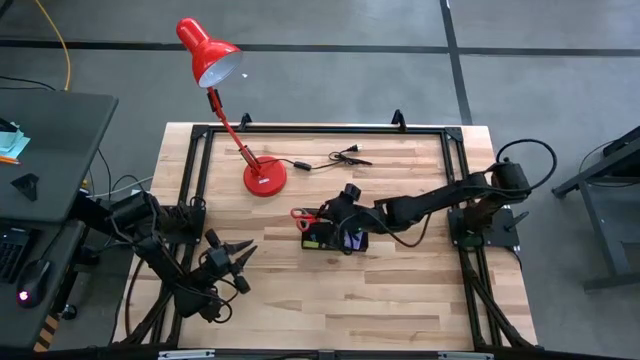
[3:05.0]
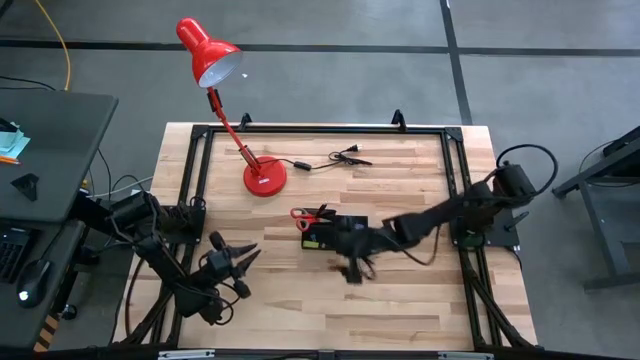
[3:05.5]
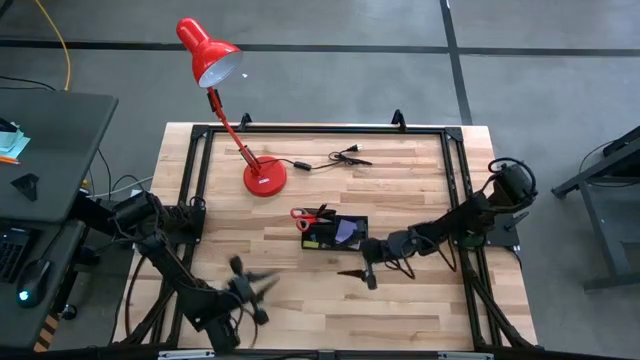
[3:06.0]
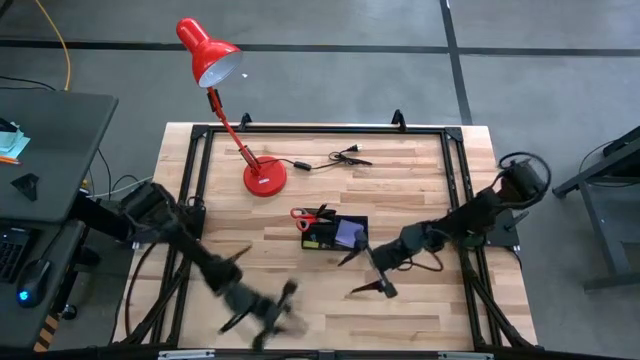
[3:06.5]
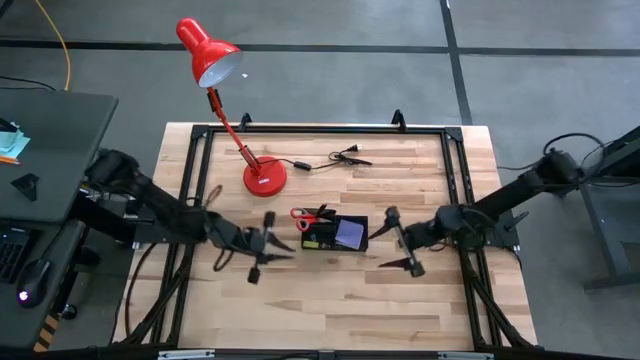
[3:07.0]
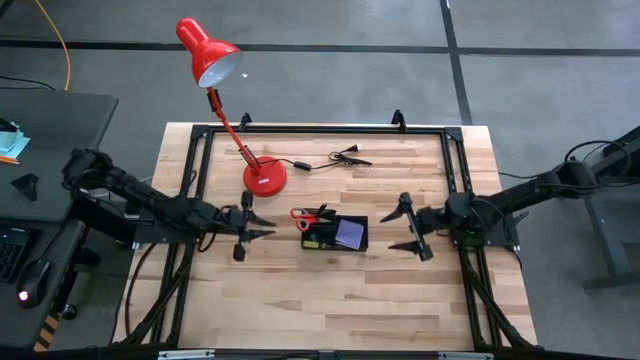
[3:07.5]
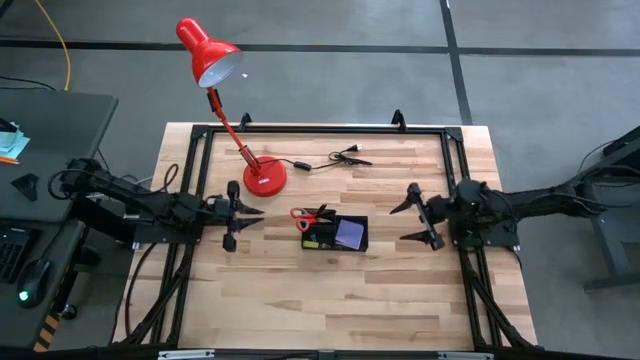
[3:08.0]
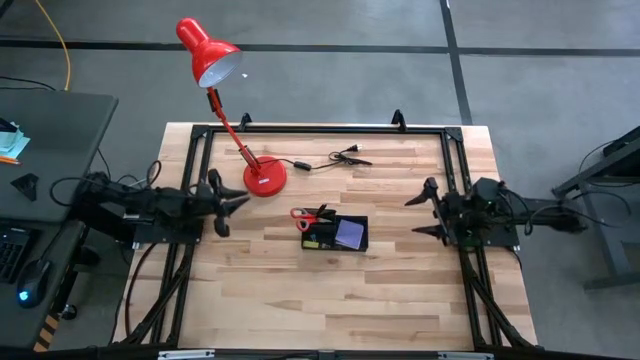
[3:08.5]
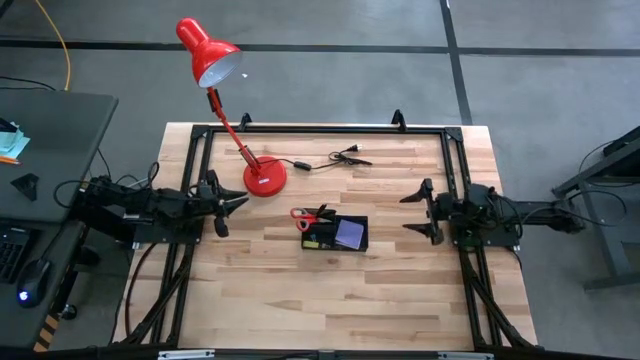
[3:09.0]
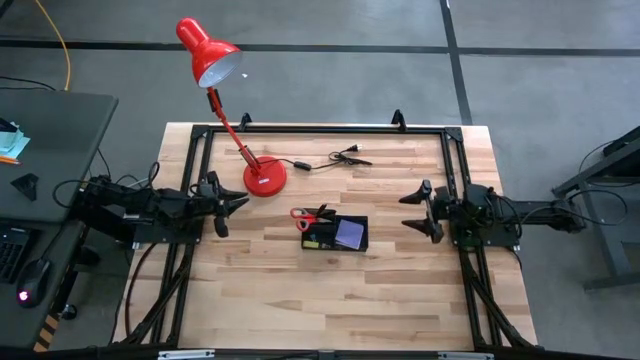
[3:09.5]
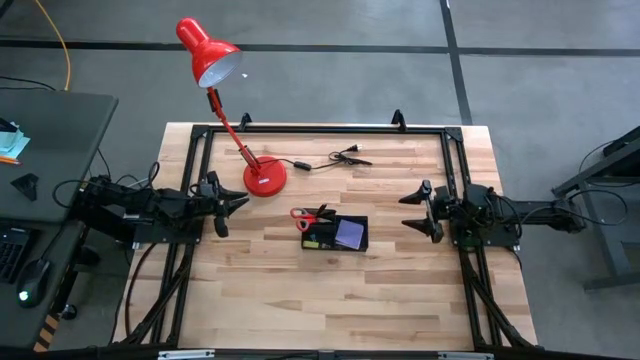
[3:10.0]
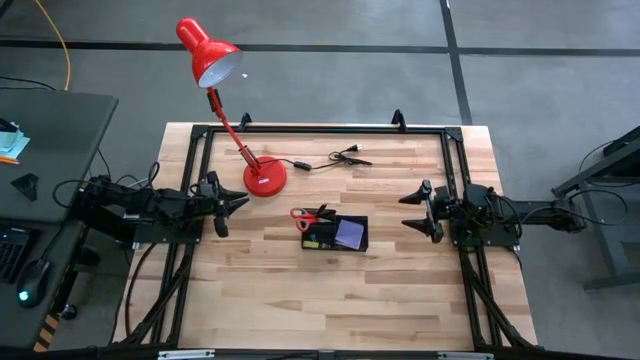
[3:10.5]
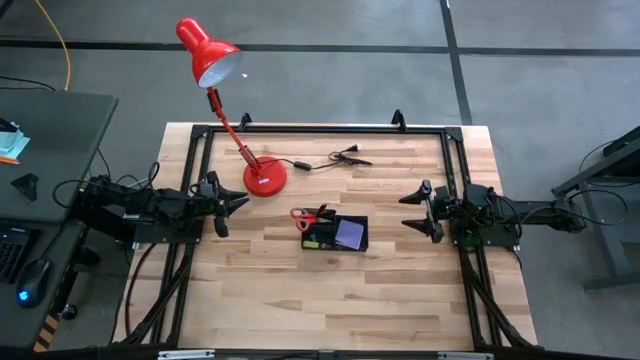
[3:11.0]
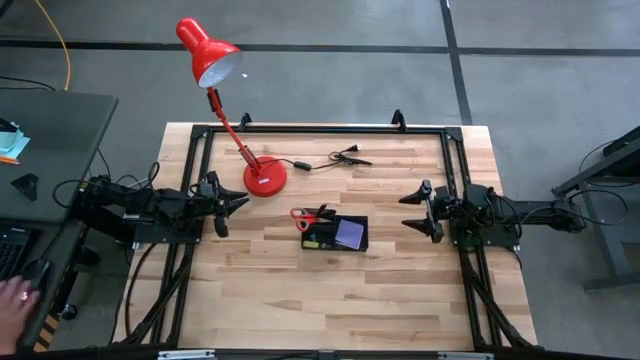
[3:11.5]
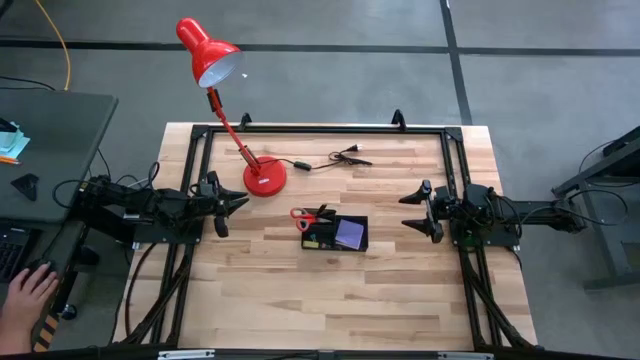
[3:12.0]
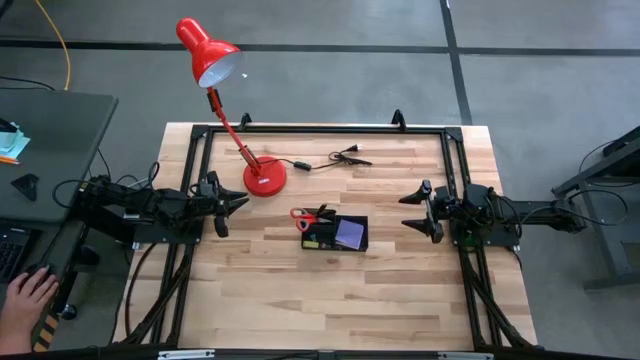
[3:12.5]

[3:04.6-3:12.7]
Task: Pick and place office supplies into organizer
Return to Home Position

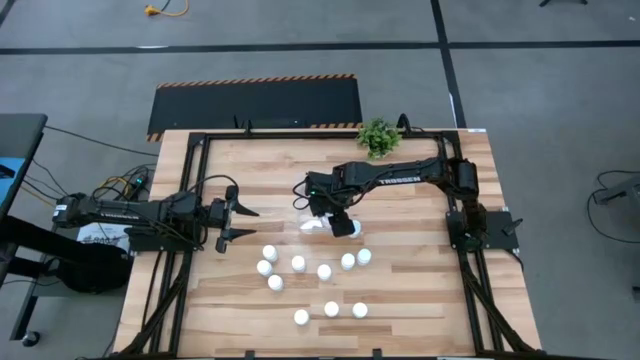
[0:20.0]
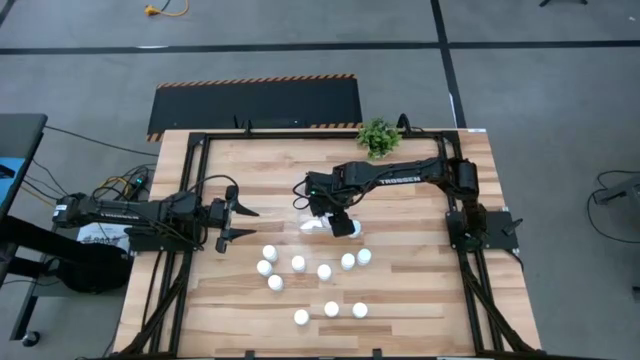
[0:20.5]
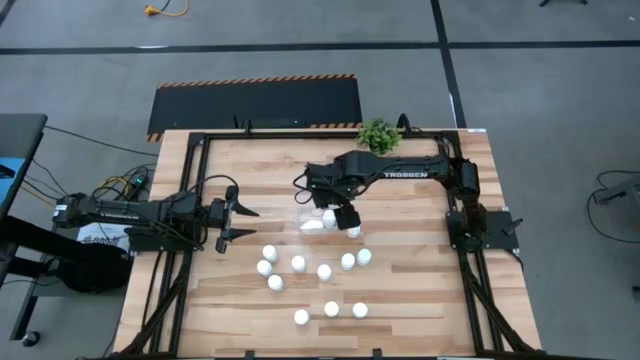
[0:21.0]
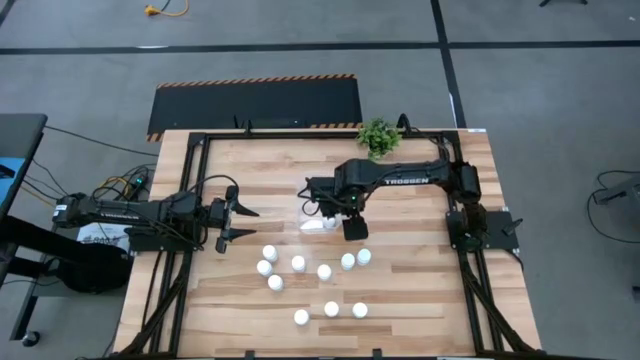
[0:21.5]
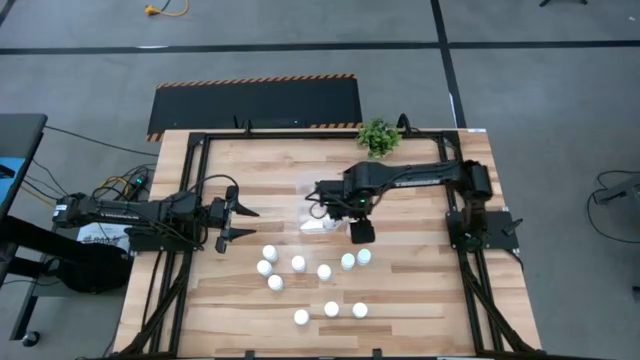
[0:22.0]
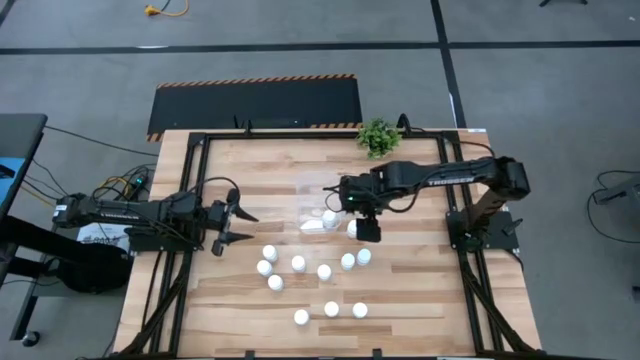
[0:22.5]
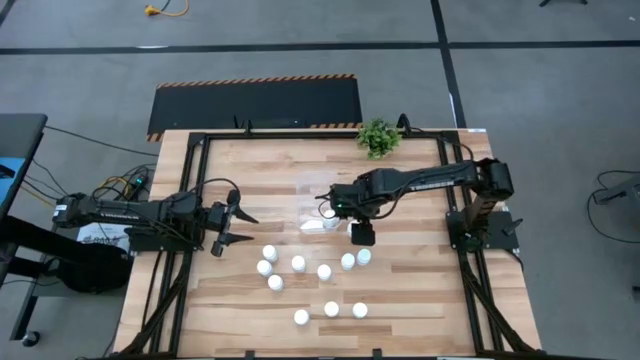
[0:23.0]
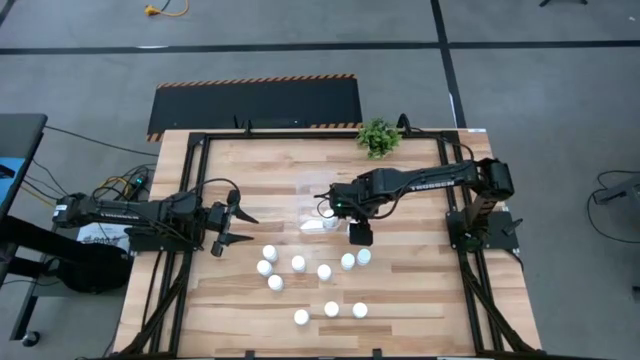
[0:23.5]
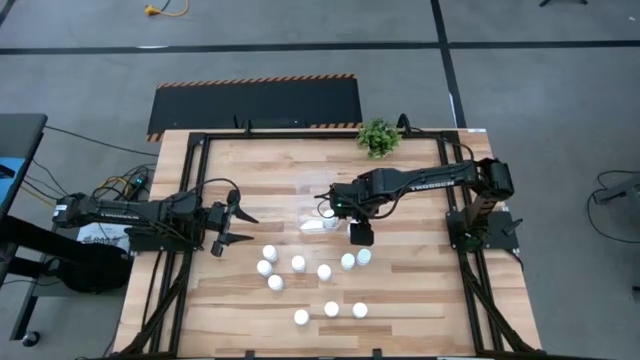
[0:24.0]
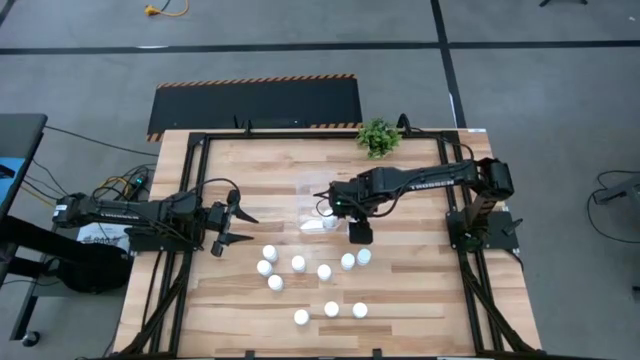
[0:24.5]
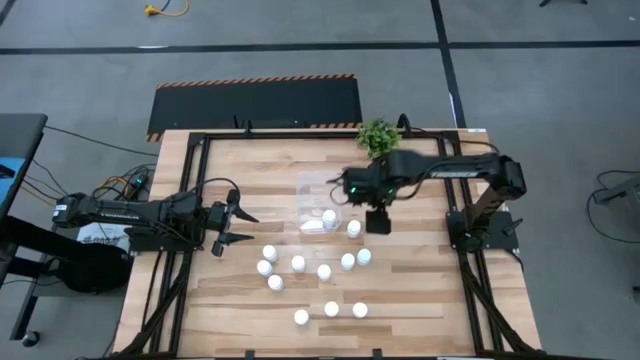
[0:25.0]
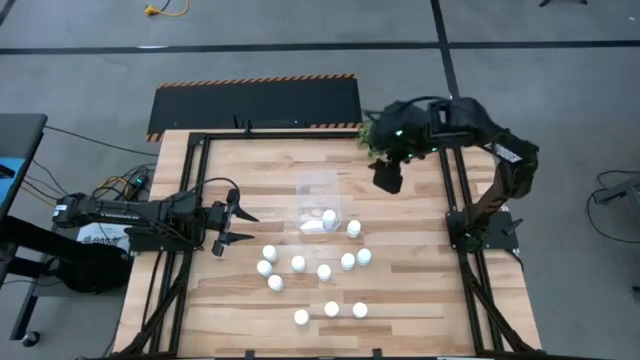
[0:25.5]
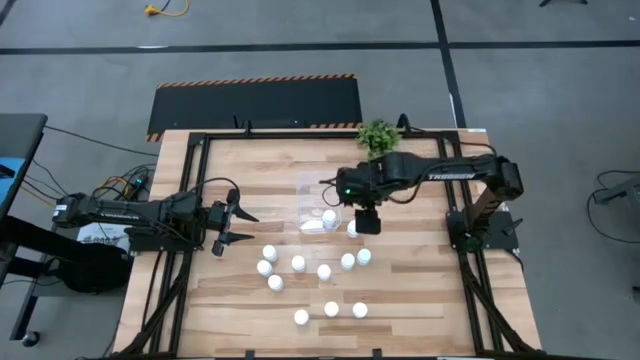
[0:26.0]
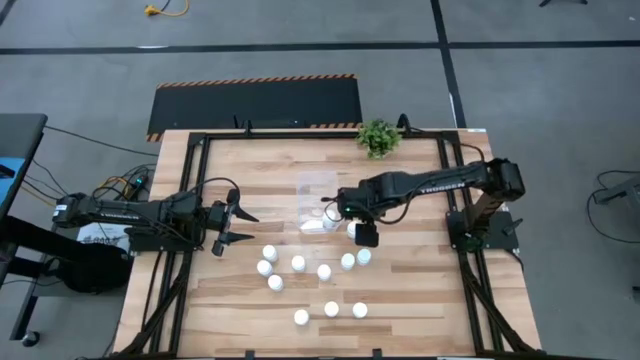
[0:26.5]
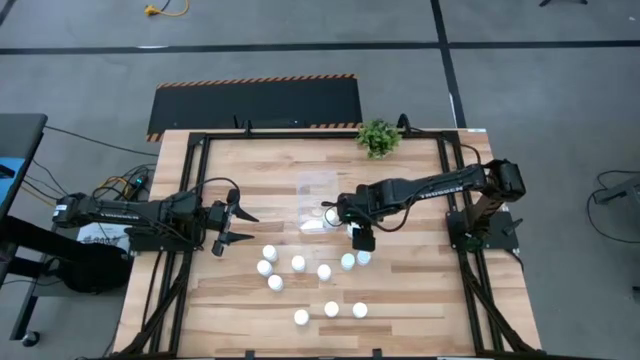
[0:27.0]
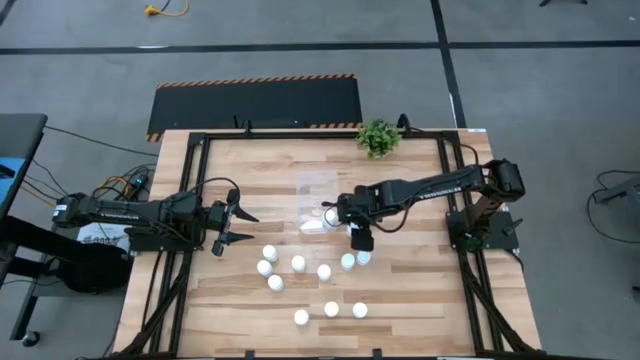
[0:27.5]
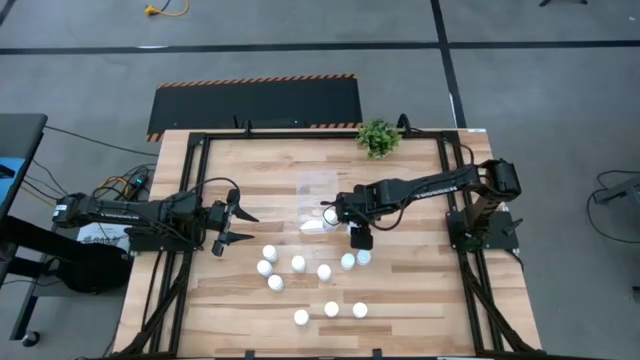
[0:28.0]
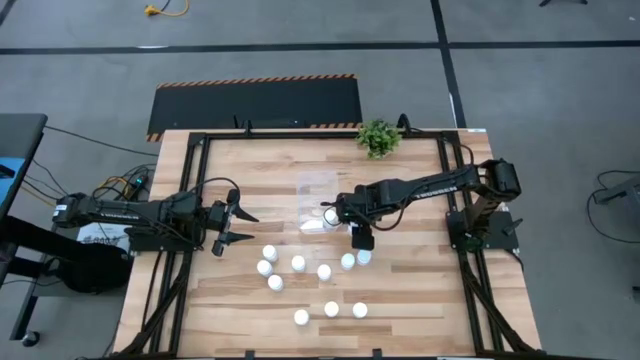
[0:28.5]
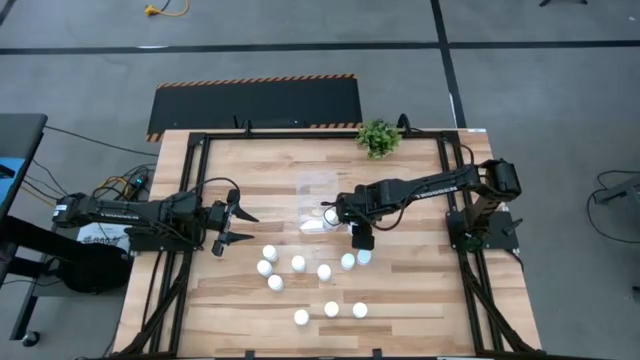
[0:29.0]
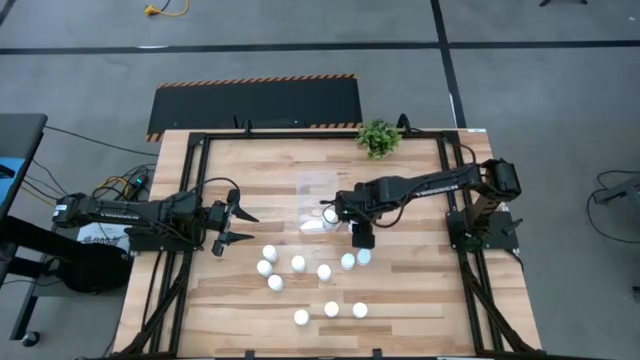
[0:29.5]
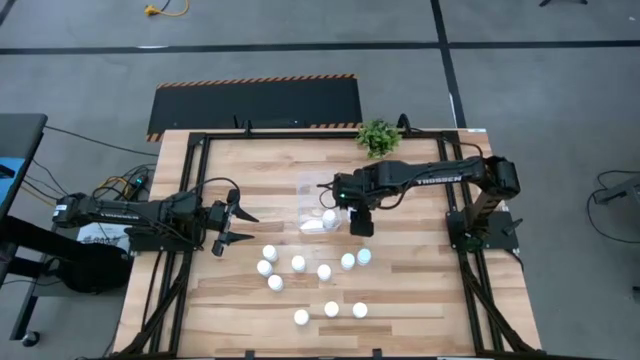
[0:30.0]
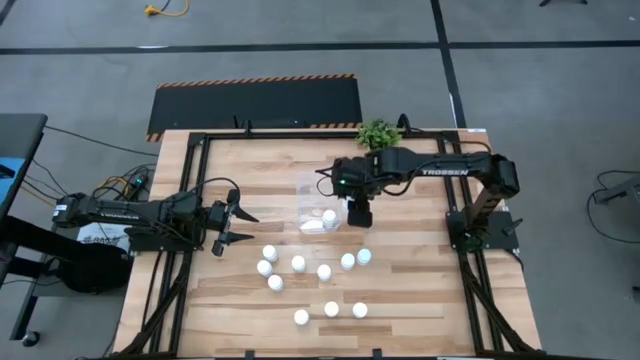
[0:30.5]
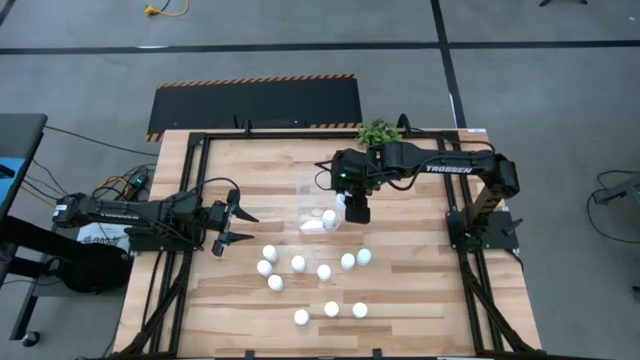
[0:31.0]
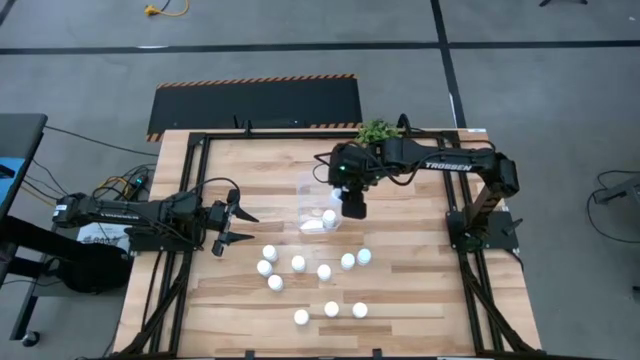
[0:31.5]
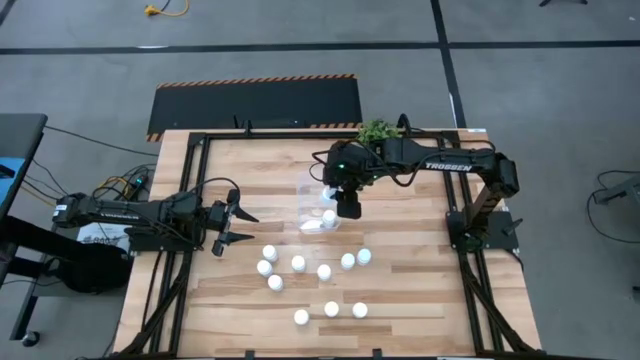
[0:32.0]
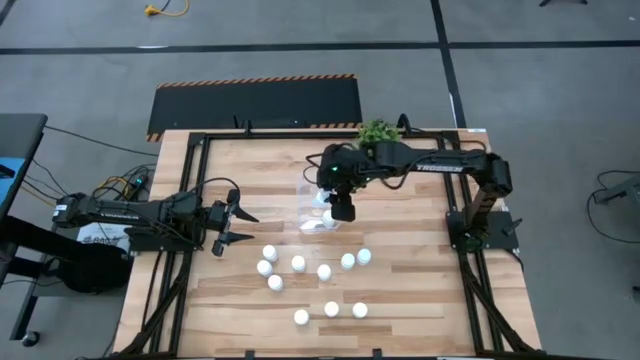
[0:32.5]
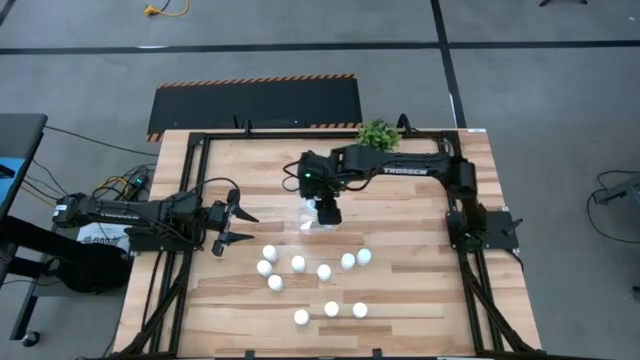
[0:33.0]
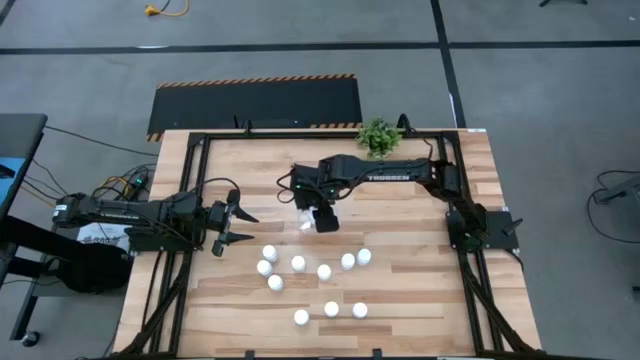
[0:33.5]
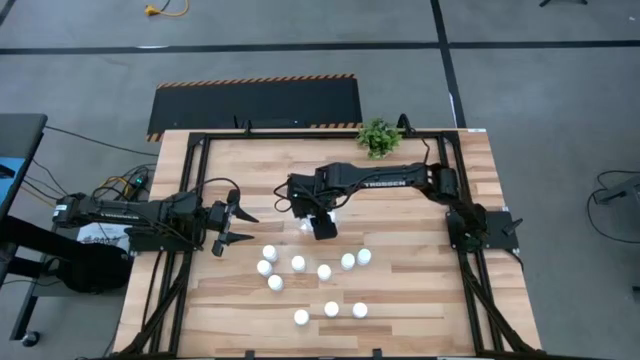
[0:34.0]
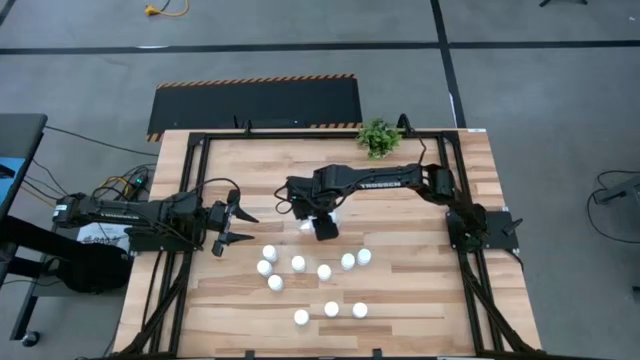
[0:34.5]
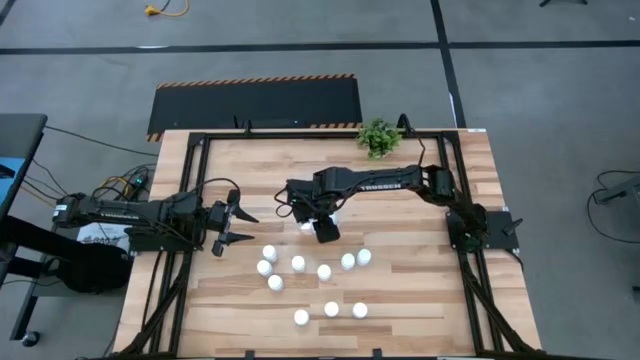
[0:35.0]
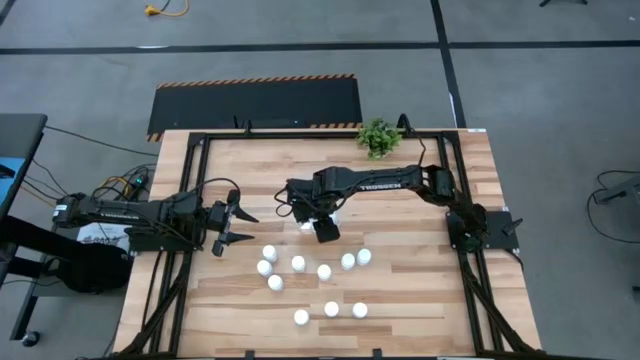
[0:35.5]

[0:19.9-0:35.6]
Task: Pick and place pill bottles into a basket
Put the pill bottles into the container
